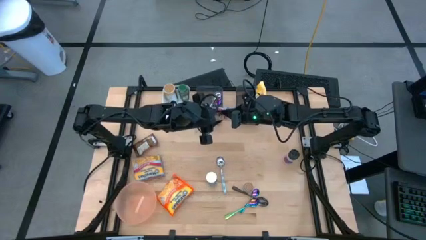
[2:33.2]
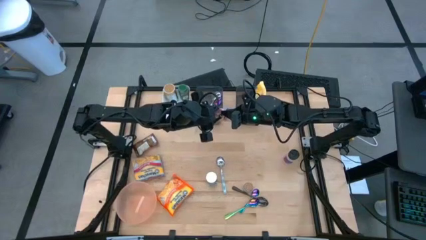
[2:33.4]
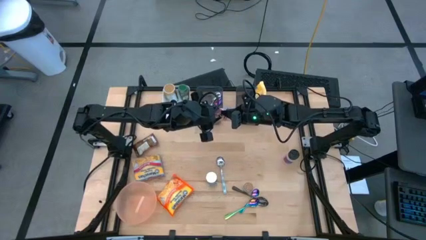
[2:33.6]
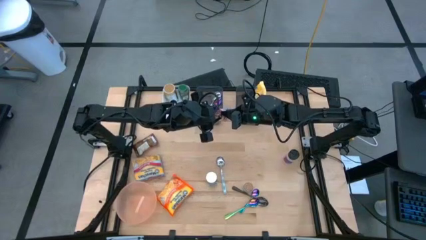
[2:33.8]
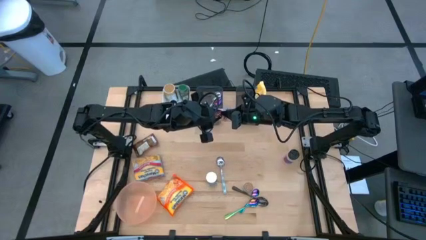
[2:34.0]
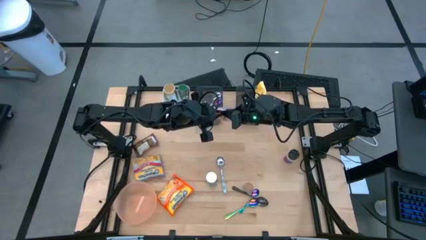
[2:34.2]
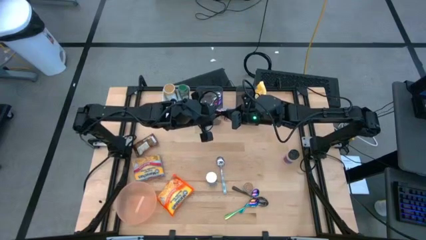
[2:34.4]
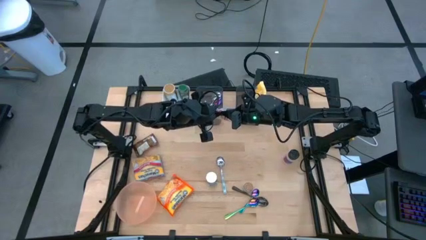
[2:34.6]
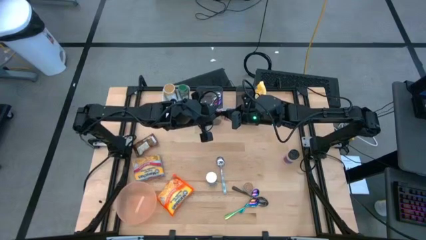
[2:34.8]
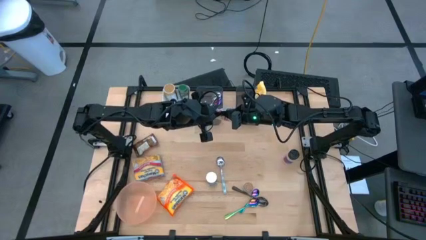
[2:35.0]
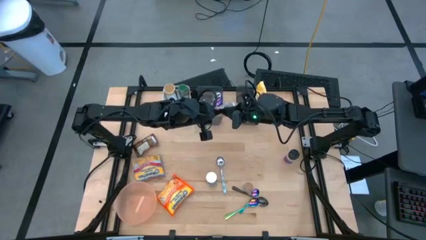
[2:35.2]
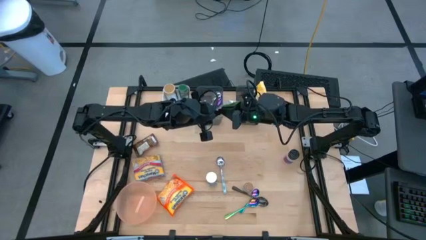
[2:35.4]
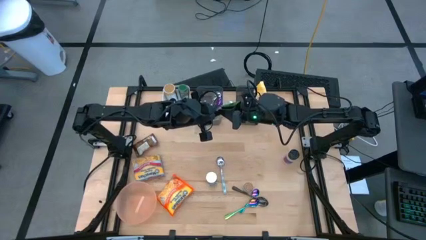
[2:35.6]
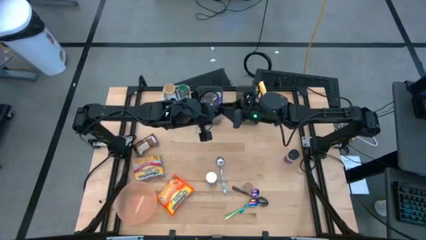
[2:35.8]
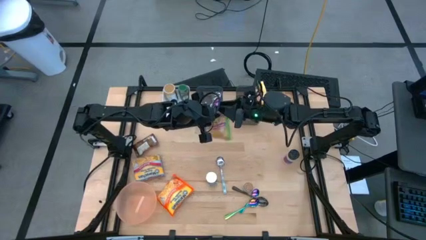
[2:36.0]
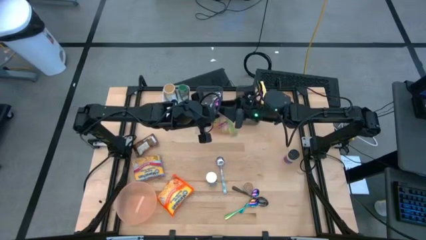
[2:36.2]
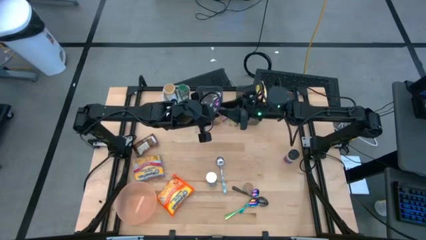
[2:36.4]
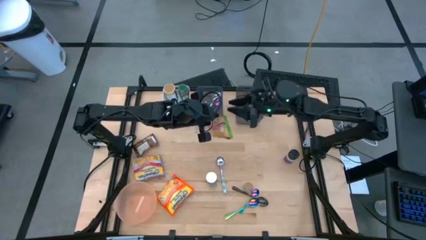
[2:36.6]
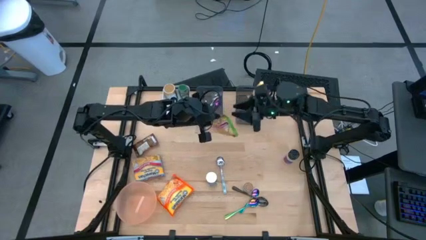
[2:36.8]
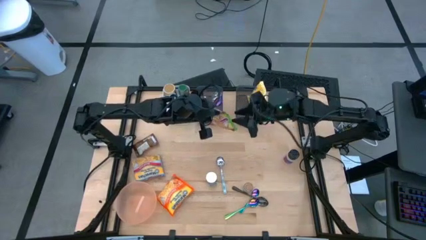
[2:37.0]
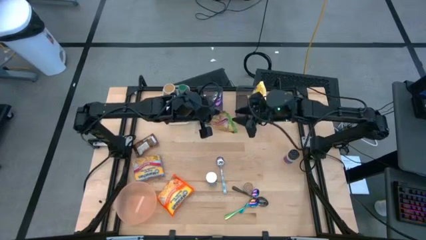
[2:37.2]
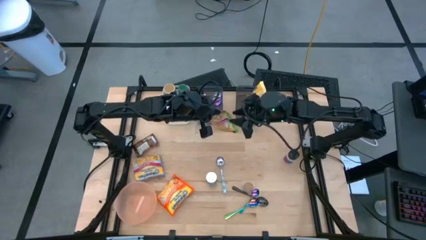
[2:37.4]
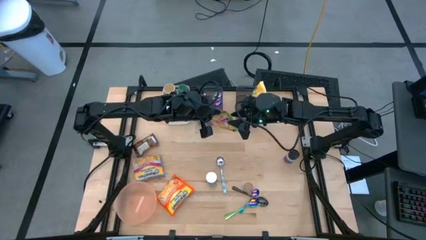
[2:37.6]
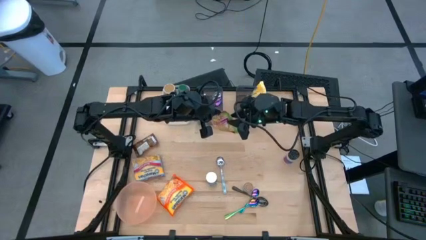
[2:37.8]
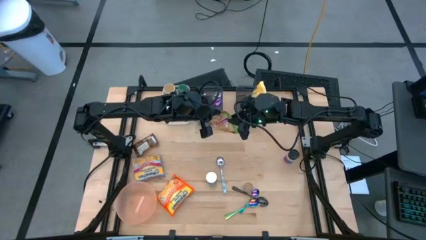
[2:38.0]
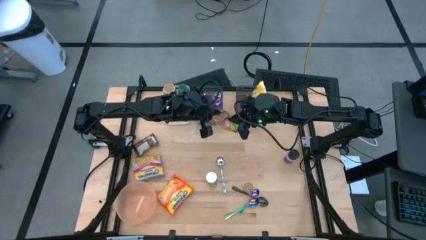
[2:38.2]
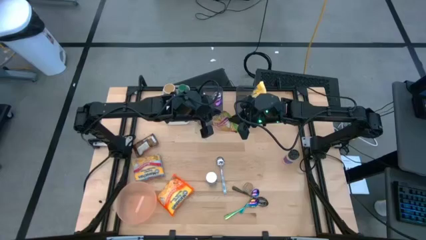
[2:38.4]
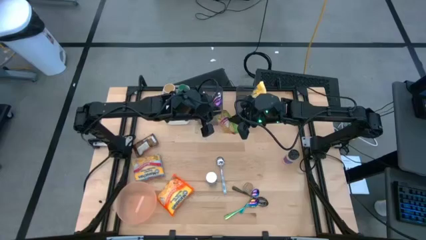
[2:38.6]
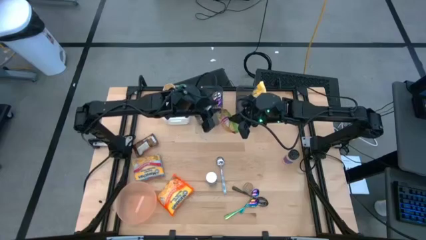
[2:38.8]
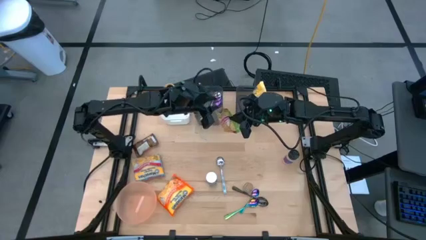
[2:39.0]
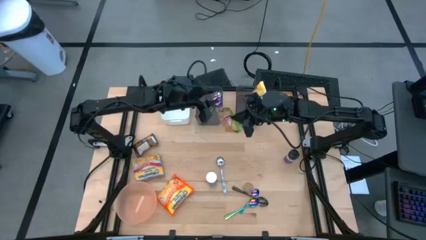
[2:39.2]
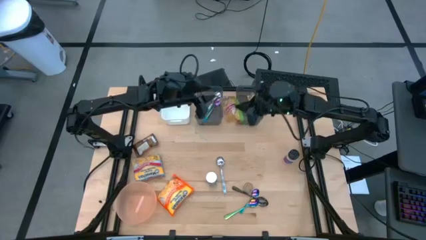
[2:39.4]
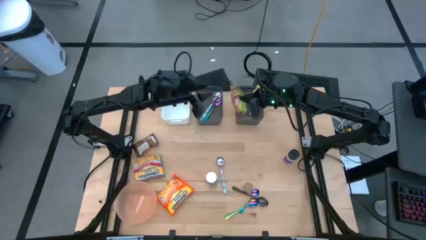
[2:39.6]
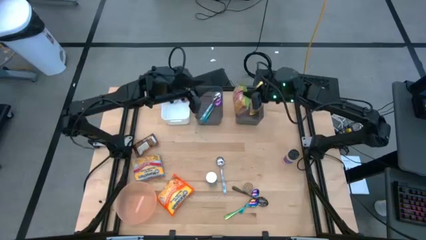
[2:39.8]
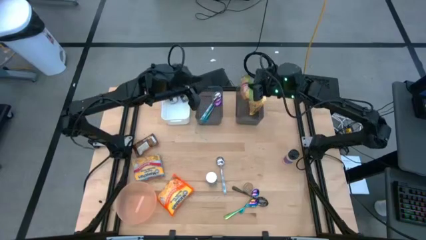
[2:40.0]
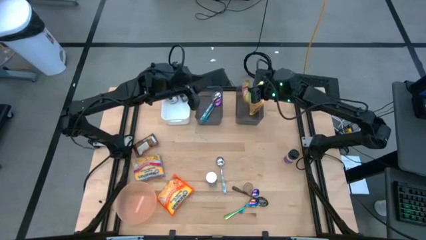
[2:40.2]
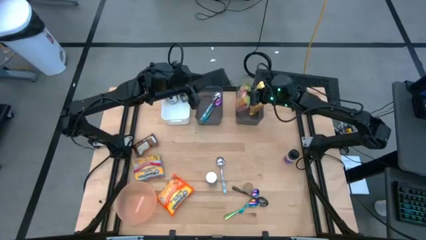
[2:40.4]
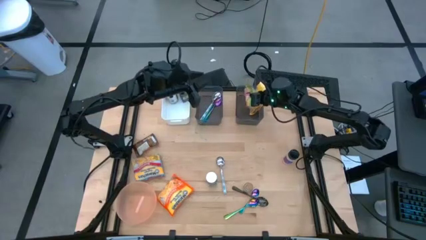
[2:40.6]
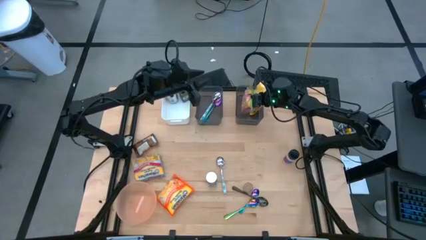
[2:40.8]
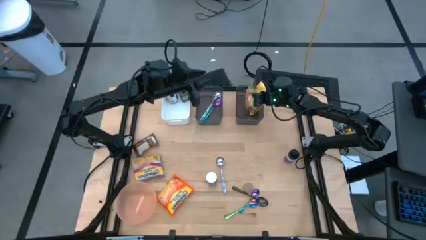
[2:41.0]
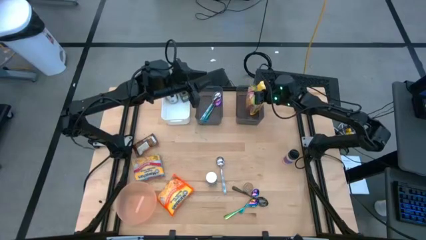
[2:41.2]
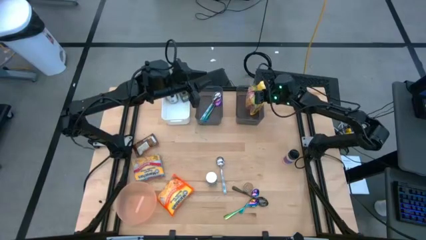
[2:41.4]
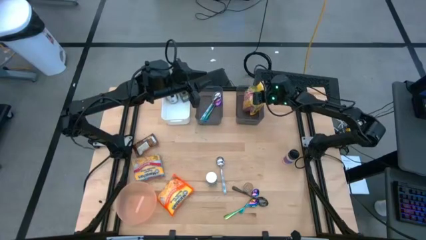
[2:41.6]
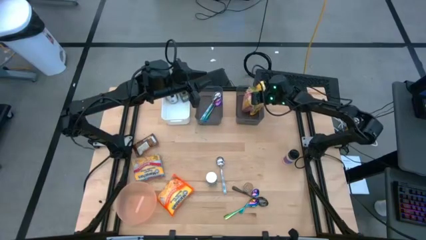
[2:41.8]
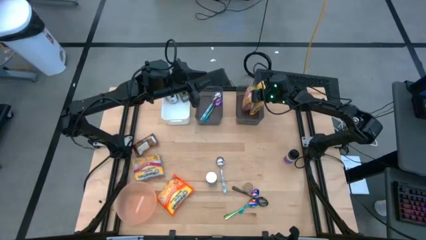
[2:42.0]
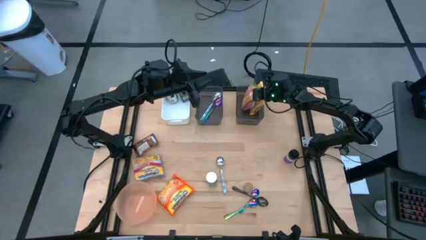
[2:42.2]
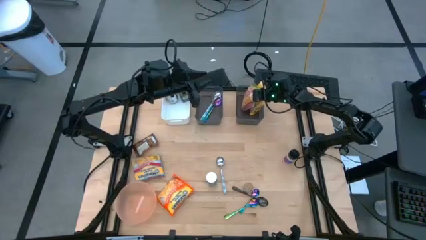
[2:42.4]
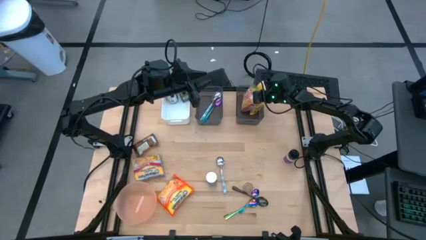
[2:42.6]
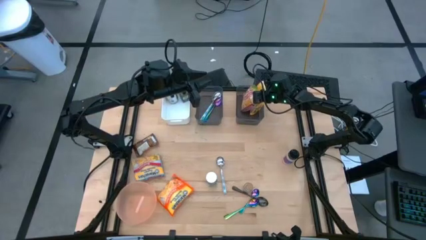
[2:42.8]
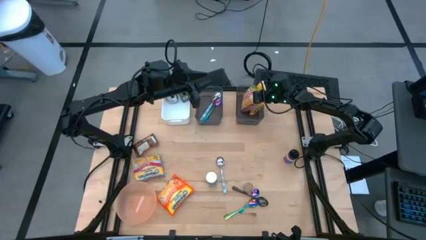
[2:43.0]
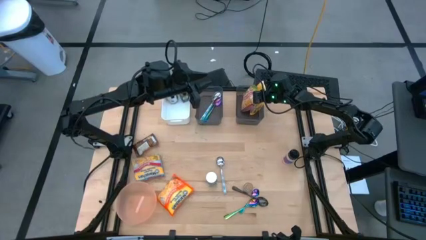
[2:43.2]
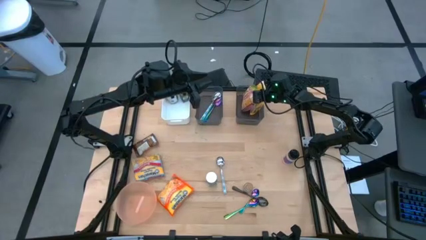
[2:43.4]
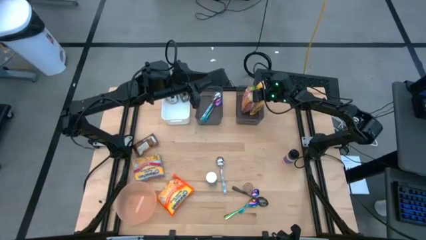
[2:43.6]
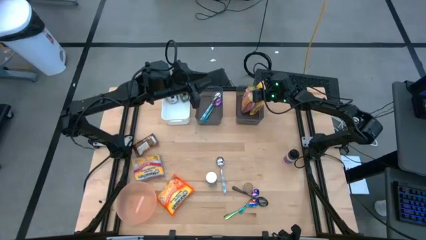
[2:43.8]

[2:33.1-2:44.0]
Task: Pick & Place Food Item
Put the green noodle pack into the right black bin

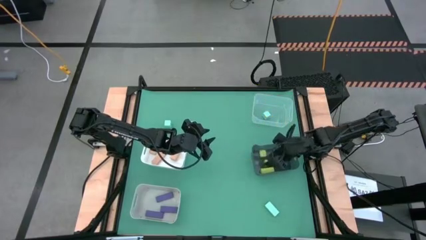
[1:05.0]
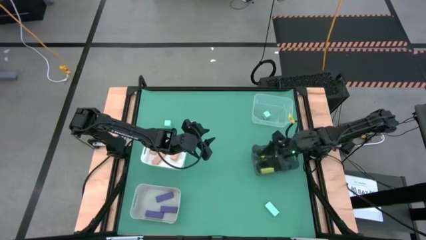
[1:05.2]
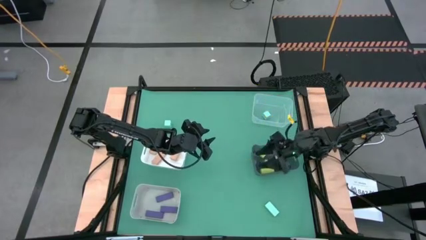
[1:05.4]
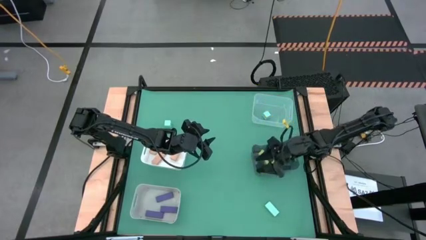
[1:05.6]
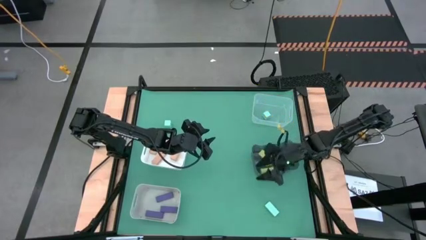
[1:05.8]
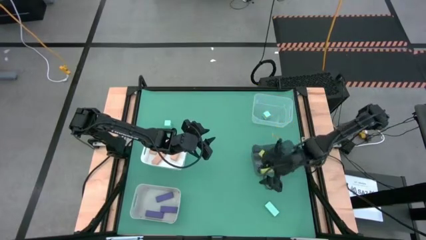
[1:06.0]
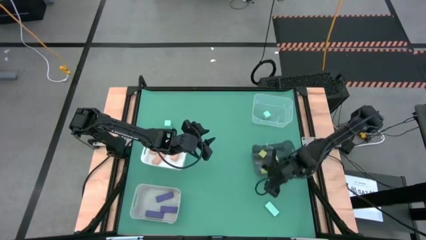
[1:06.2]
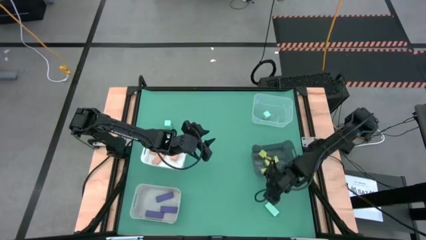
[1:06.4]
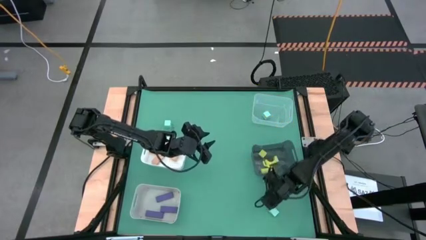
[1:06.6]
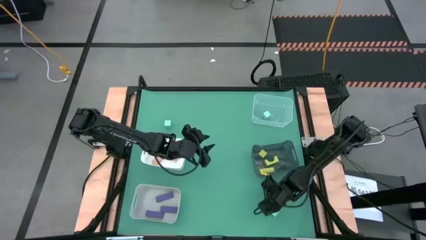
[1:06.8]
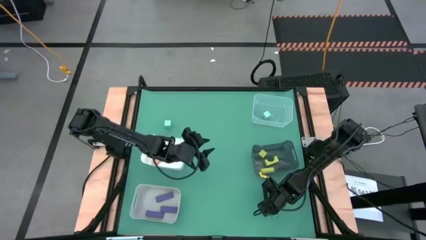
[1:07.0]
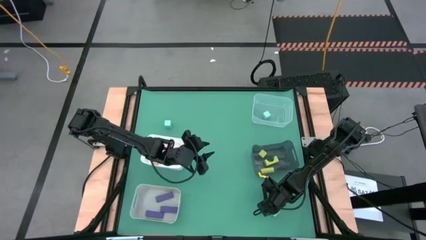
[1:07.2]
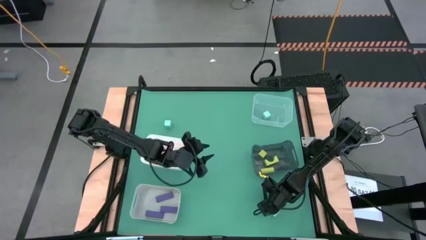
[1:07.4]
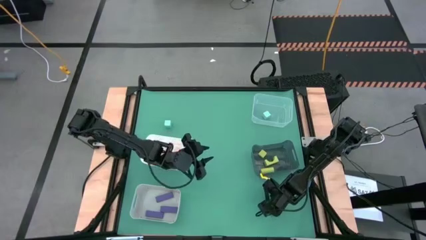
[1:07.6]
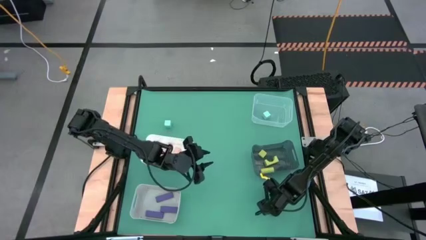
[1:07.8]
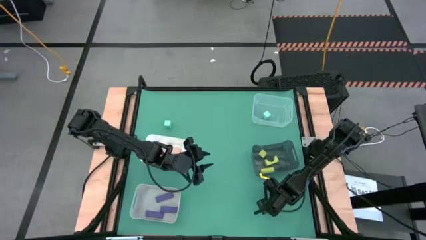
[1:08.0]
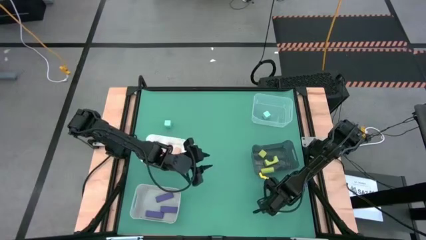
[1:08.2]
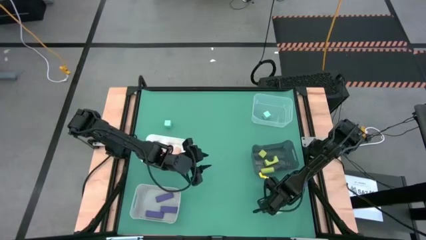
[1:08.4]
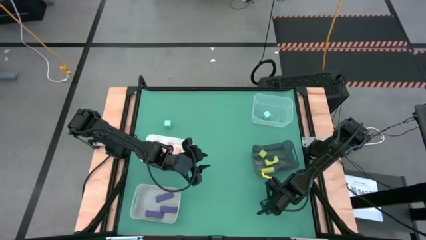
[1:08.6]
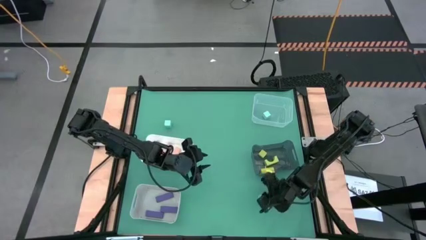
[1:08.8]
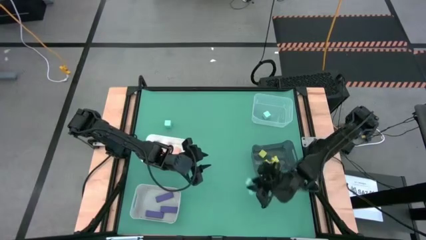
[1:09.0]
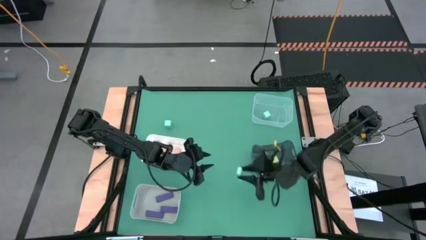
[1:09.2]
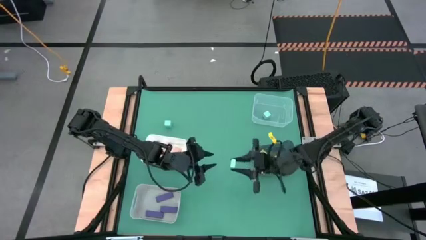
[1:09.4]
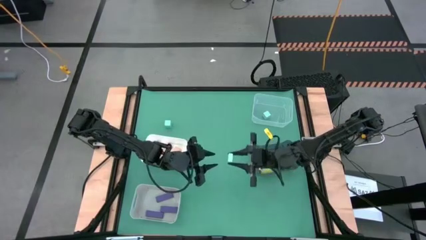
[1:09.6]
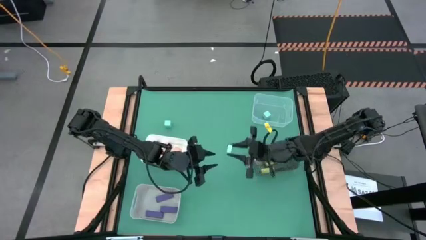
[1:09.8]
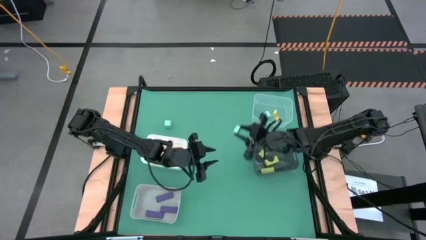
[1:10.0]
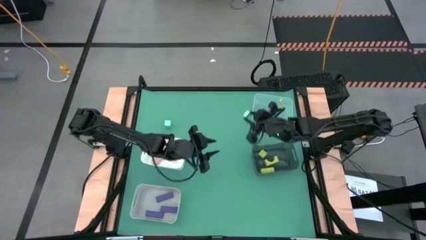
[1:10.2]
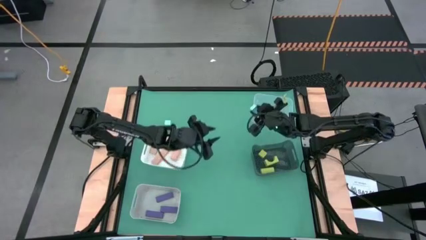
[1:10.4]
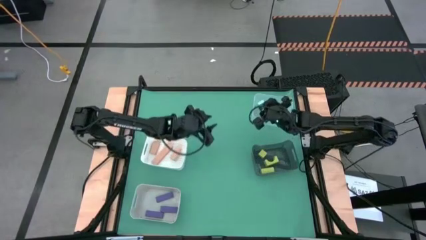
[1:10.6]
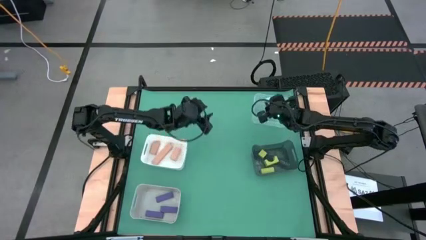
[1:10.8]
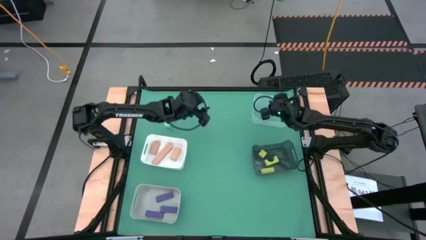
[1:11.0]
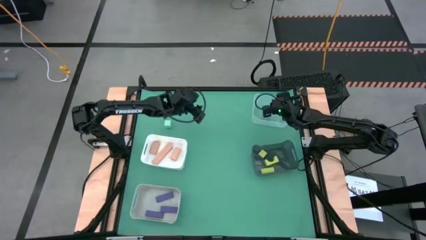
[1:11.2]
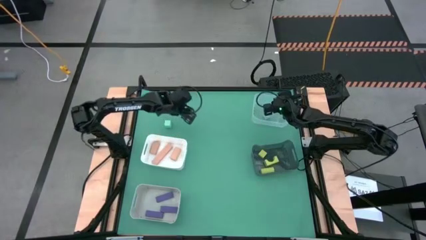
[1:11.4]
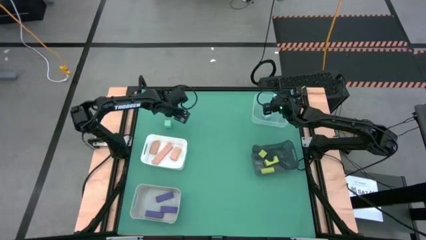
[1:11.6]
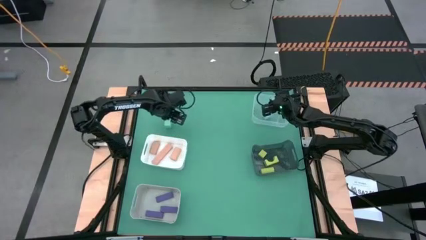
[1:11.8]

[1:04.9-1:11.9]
Task: Sort & place blocks by color
Put the bottom blue block into the transparent bin
